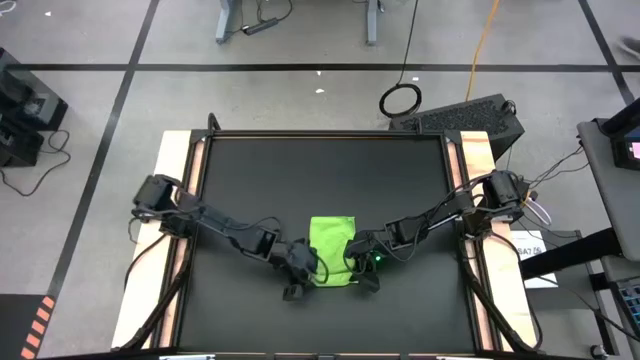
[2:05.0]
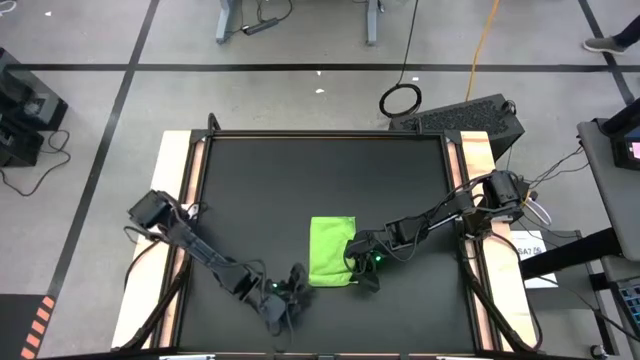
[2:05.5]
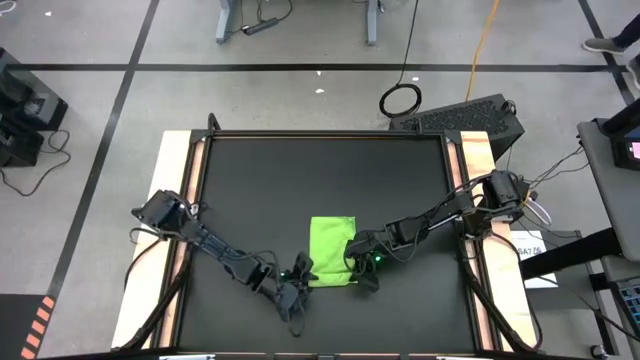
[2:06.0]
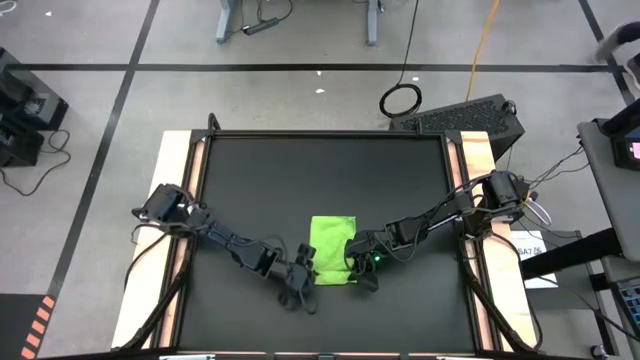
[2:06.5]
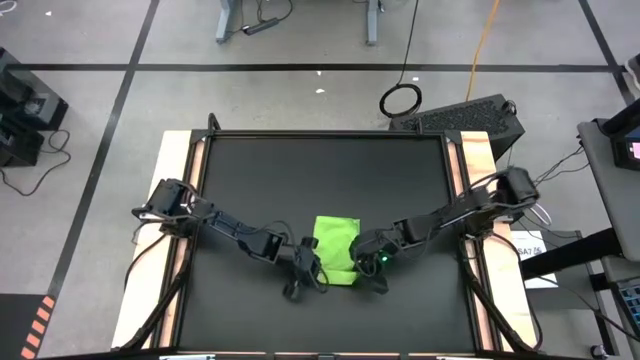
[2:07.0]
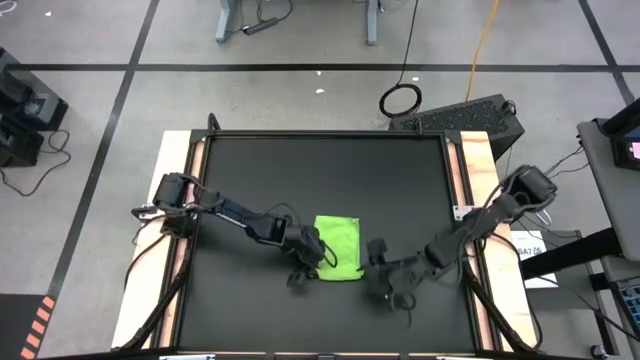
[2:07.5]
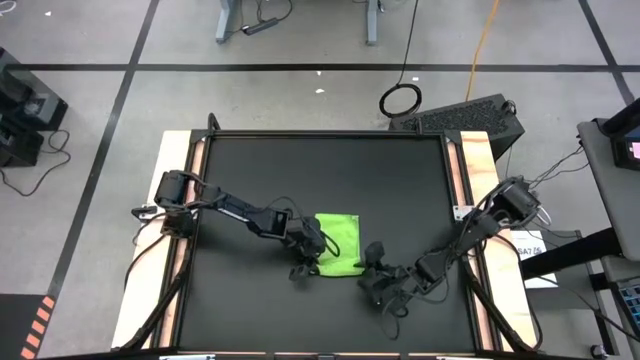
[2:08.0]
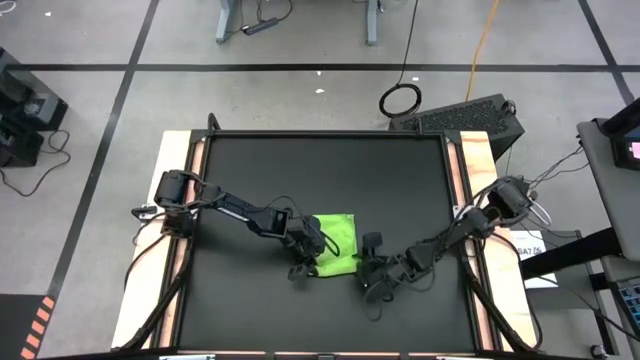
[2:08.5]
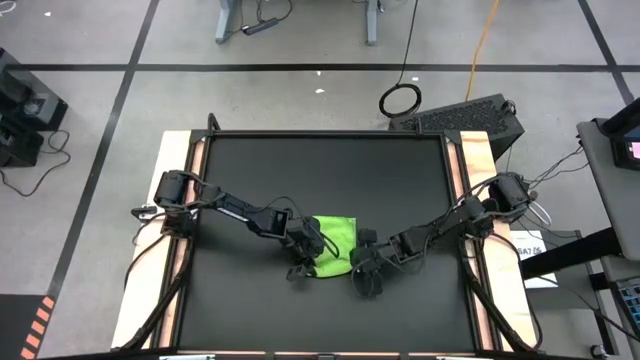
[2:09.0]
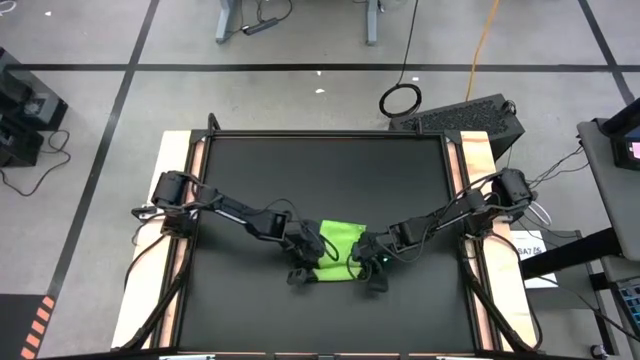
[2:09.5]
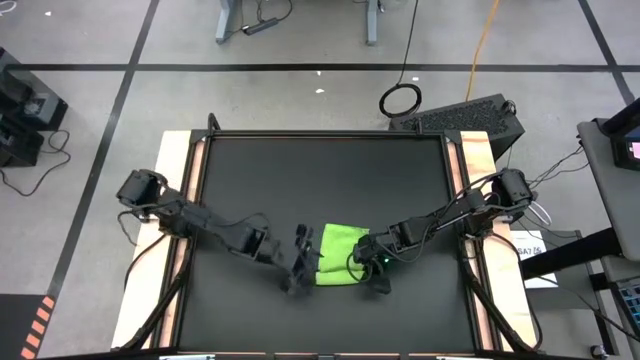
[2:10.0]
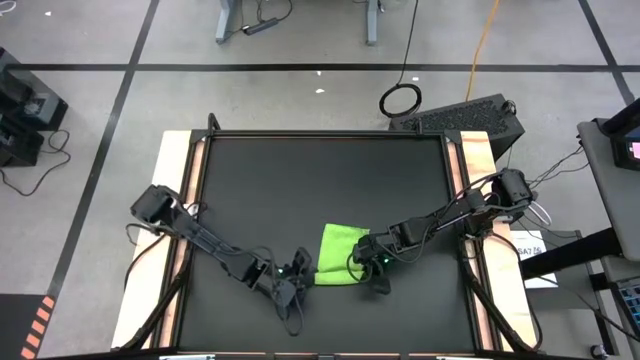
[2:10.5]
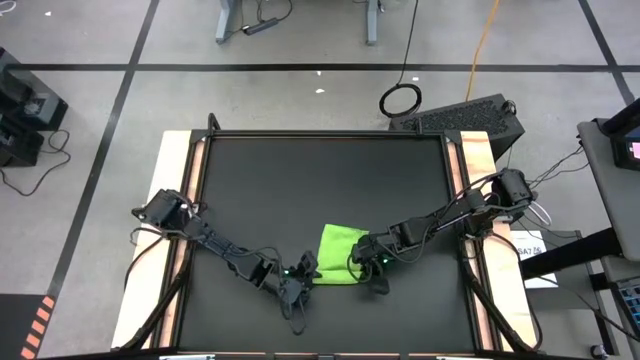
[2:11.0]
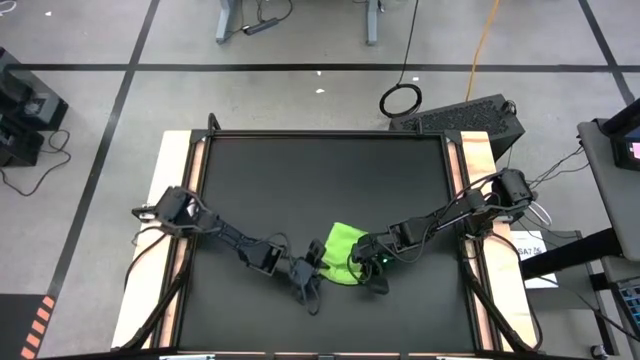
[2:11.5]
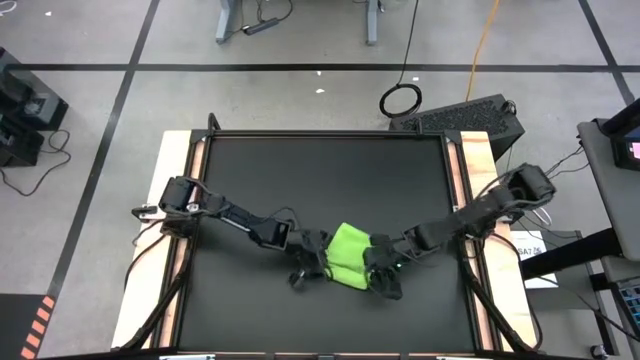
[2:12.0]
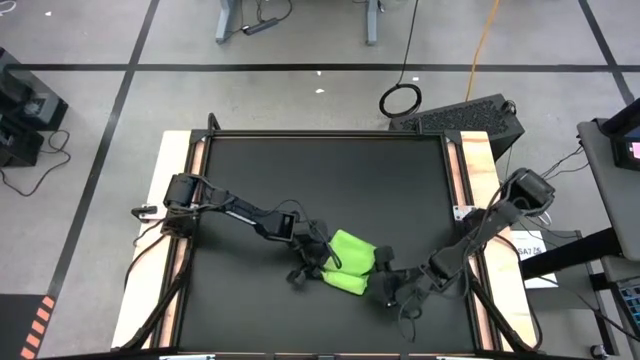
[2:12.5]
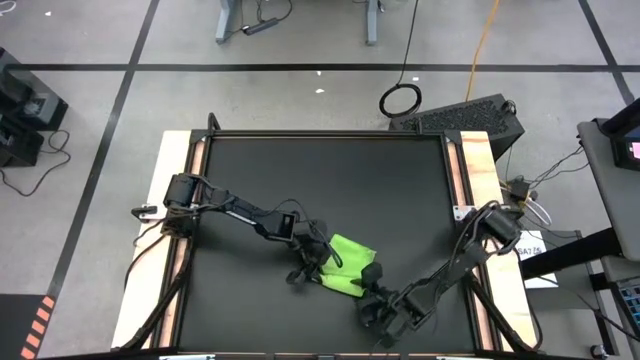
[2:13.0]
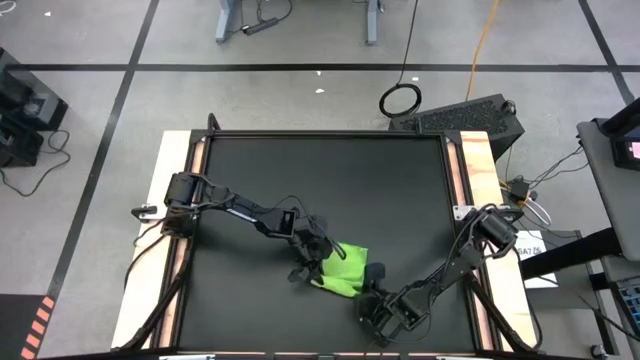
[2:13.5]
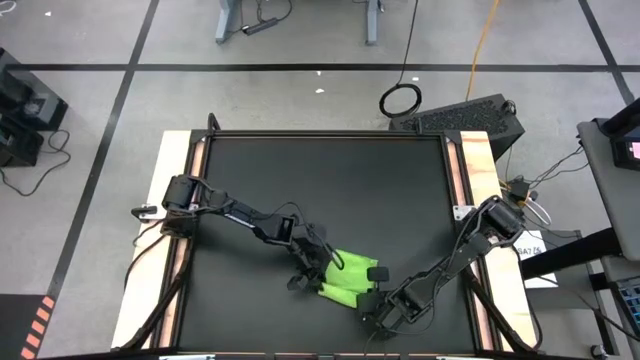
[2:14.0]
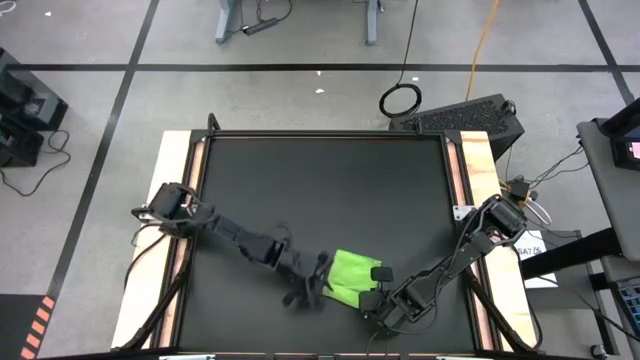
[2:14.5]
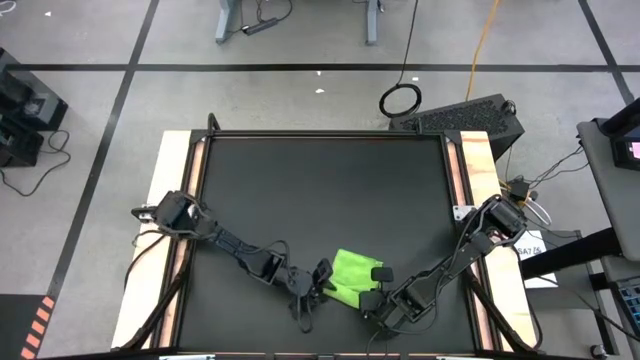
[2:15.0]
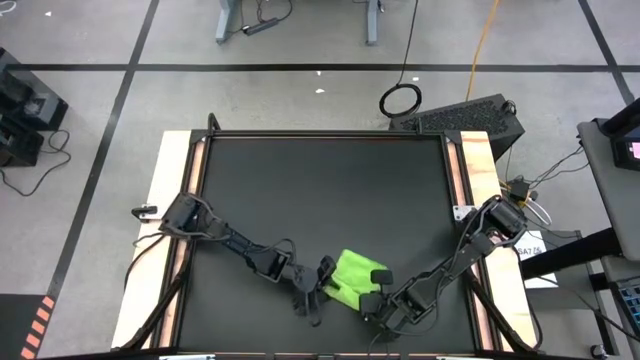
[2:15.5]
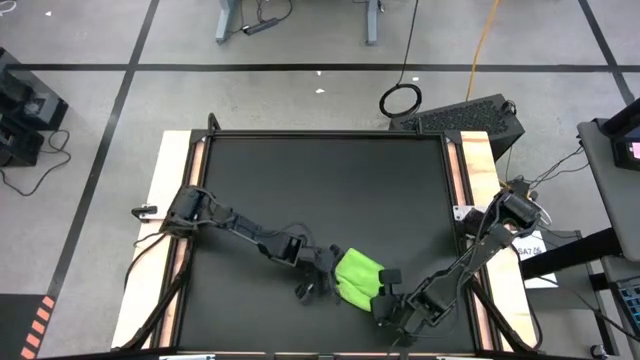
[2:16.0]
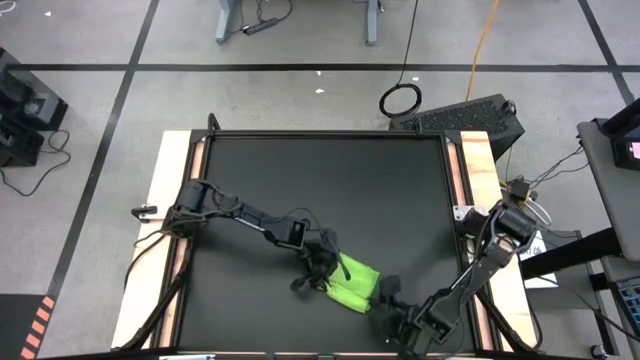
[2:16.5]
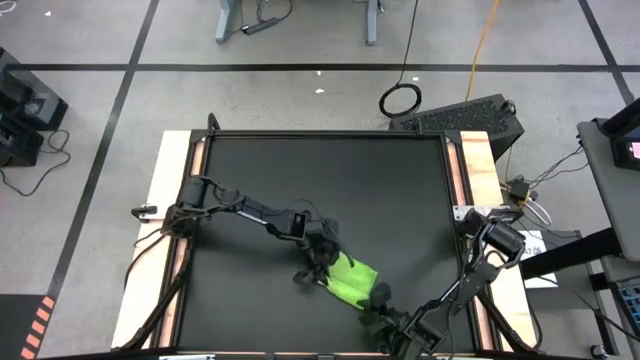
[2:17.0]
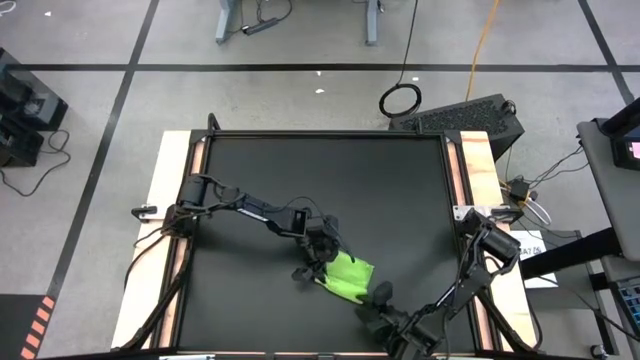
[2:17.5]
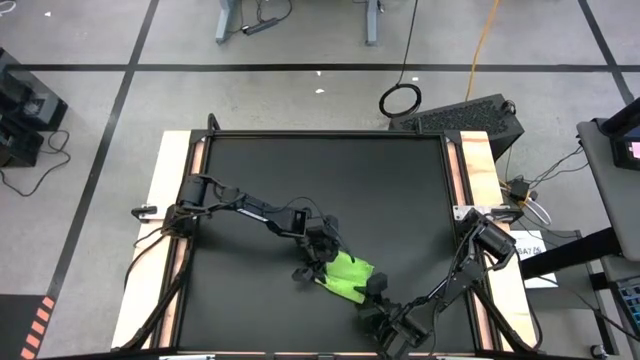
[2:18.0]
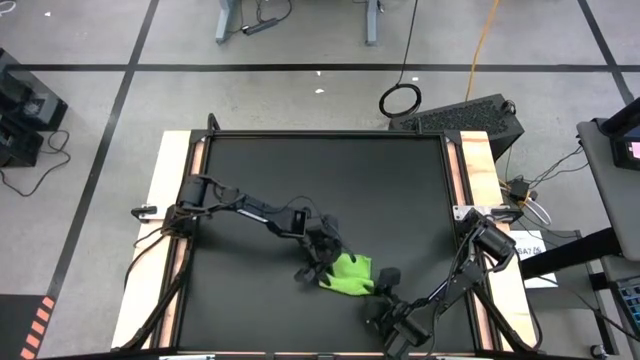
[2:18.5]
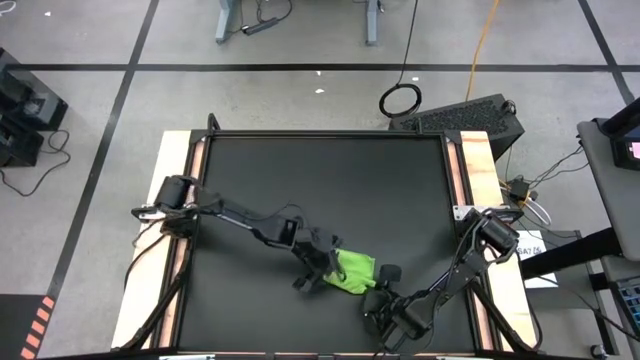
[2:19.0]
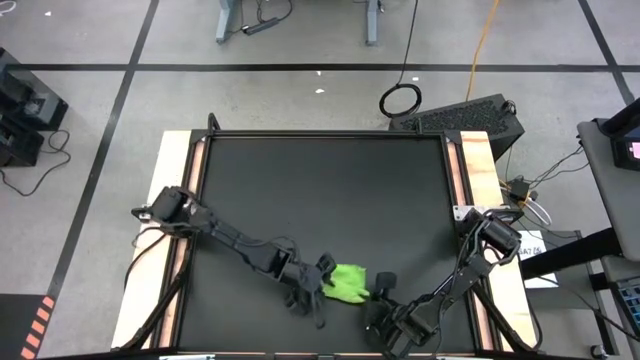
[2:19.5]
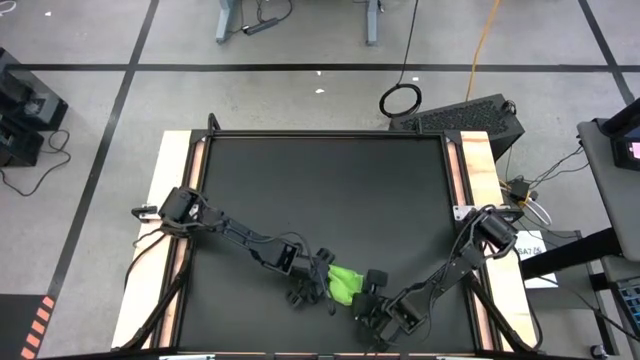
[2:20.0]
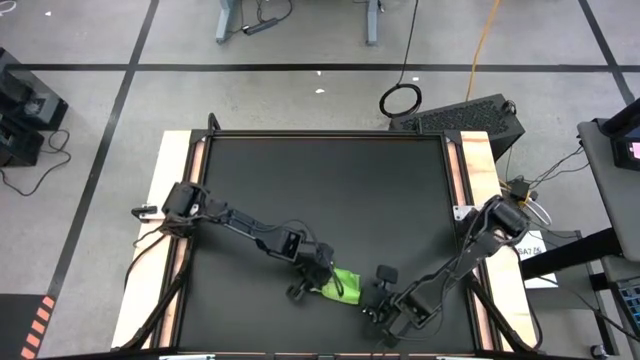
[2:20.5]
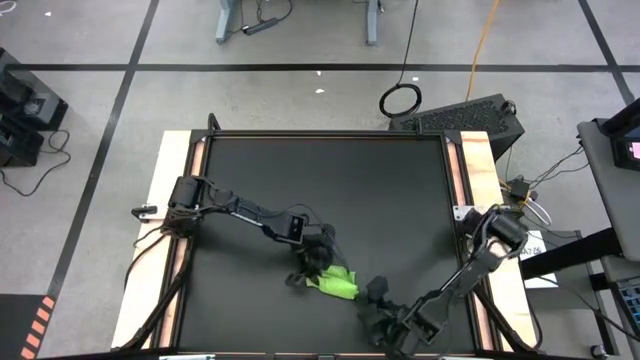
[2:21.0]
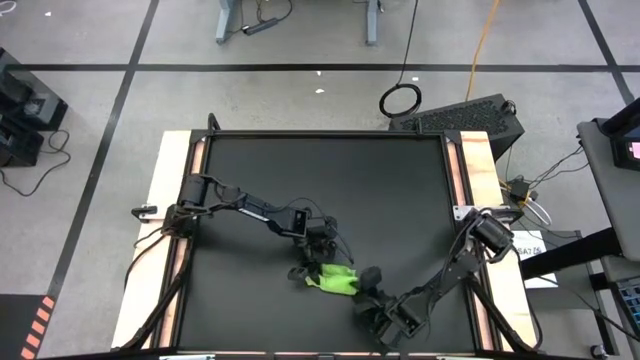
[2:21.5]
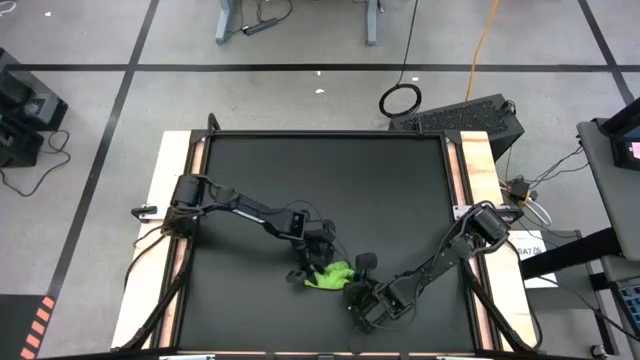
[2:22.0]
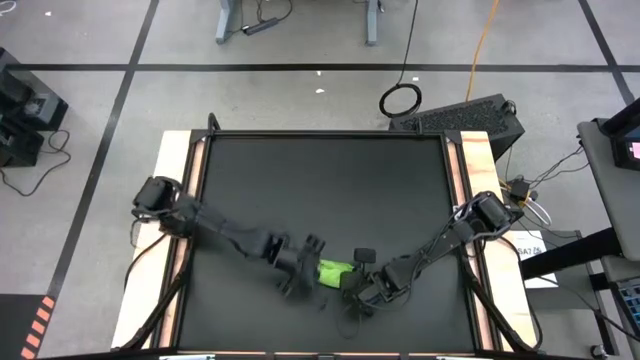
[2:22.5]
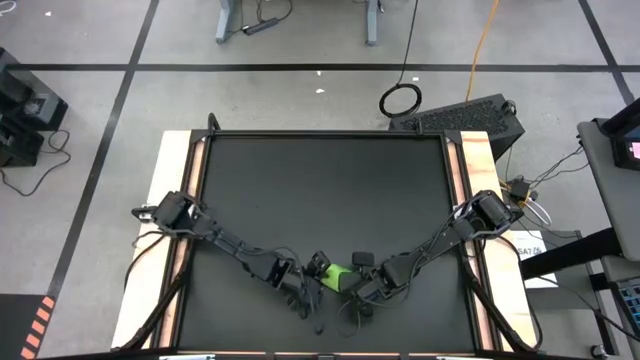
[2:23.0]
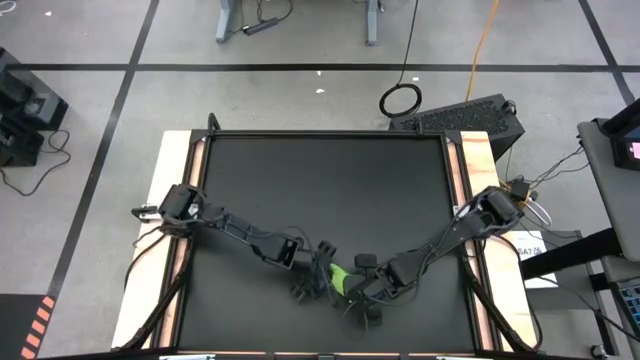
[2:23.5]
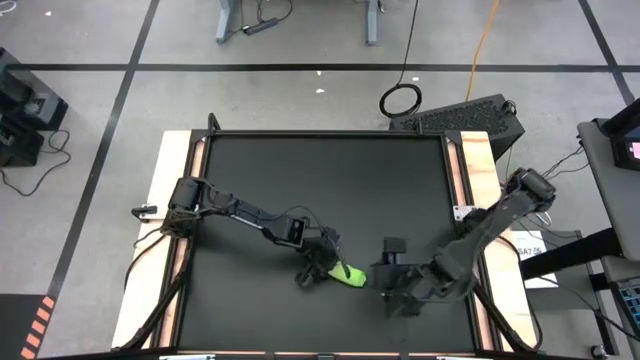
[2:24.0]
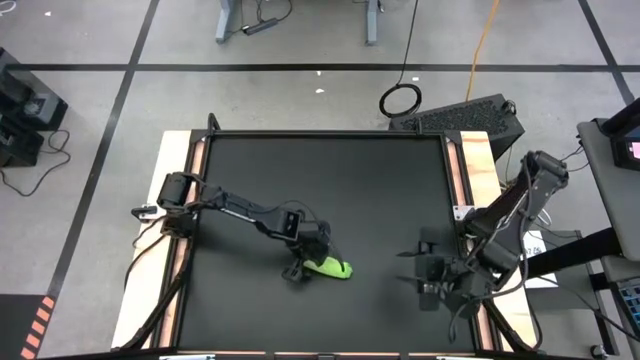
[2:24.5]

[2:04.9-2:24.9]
Task: Roll towel
Roll the green towel on the table
